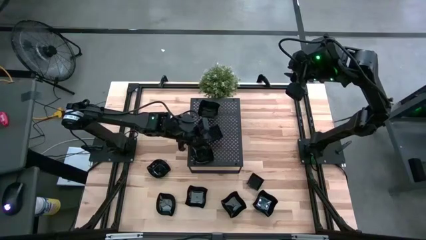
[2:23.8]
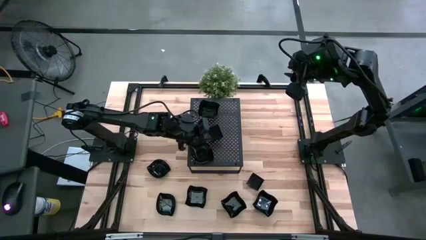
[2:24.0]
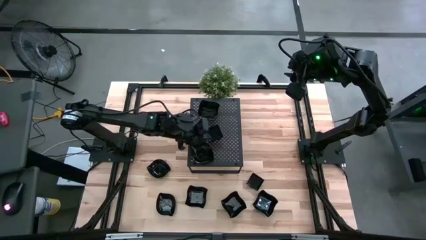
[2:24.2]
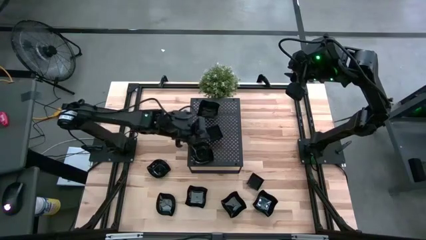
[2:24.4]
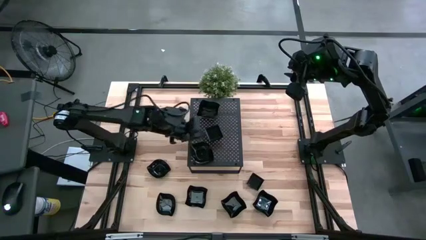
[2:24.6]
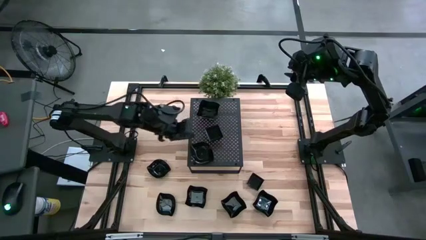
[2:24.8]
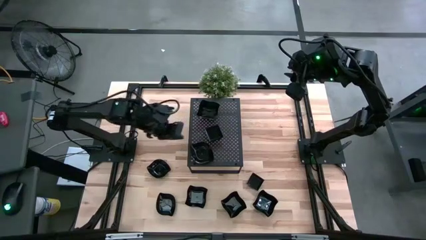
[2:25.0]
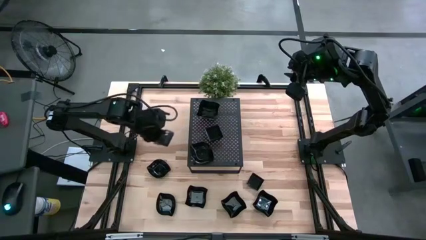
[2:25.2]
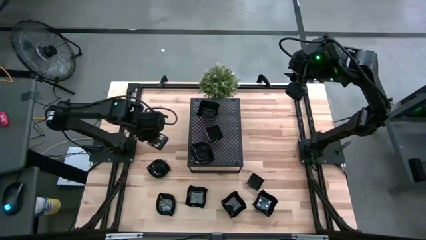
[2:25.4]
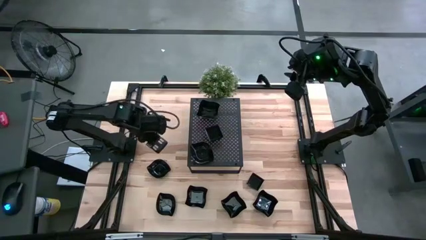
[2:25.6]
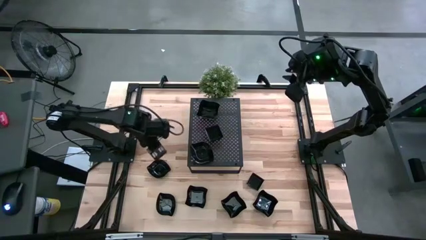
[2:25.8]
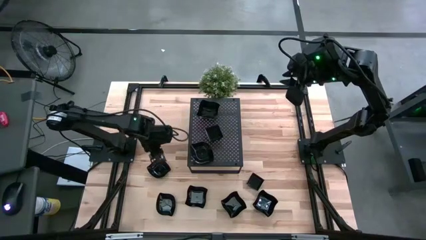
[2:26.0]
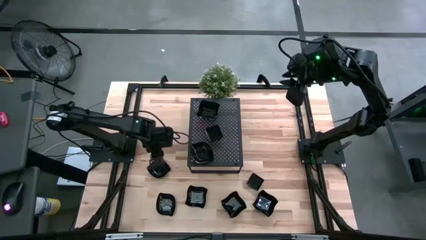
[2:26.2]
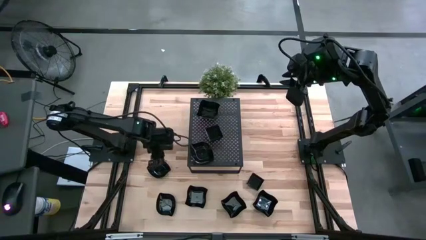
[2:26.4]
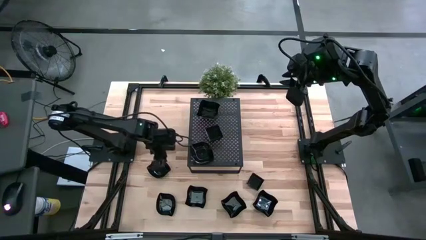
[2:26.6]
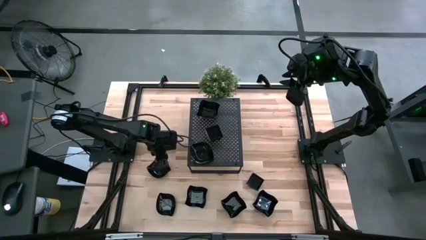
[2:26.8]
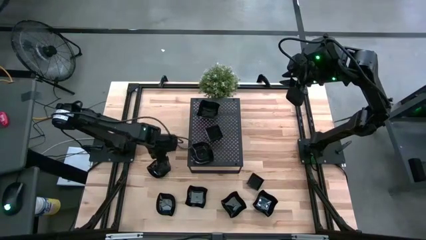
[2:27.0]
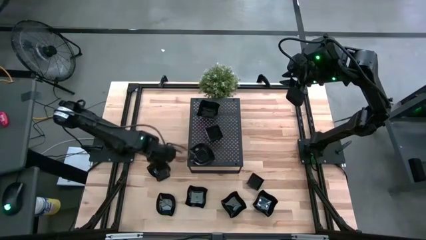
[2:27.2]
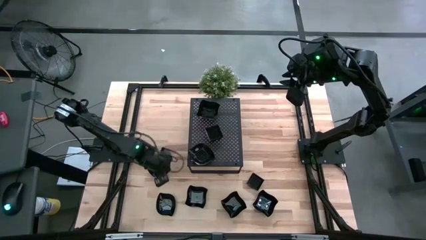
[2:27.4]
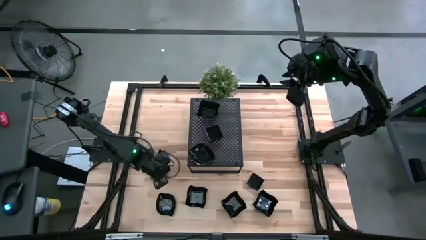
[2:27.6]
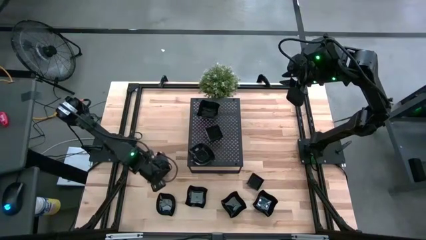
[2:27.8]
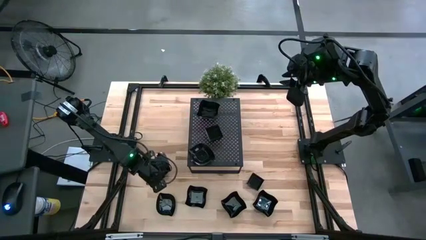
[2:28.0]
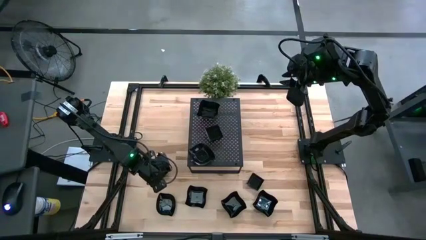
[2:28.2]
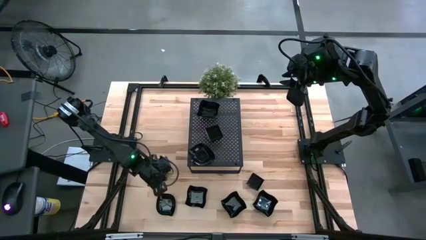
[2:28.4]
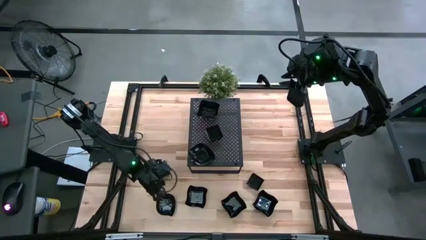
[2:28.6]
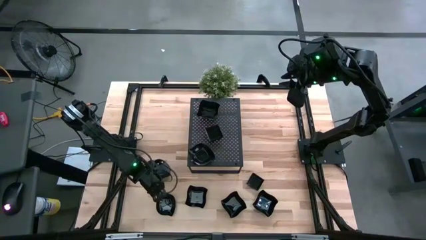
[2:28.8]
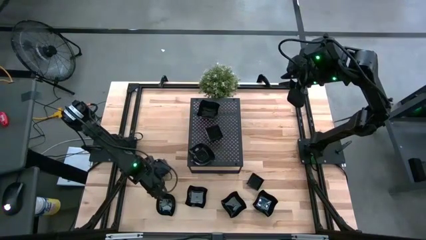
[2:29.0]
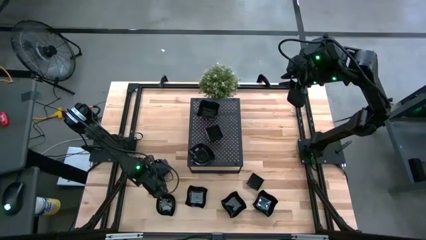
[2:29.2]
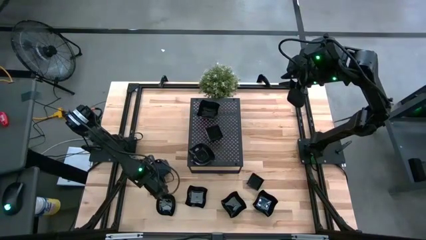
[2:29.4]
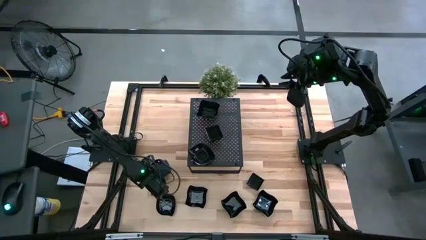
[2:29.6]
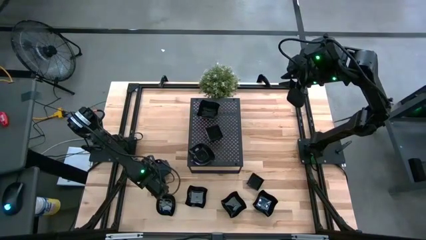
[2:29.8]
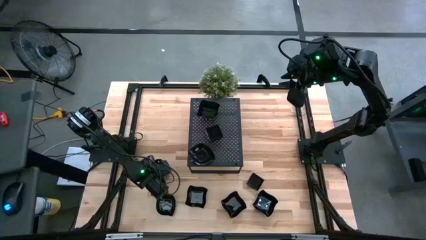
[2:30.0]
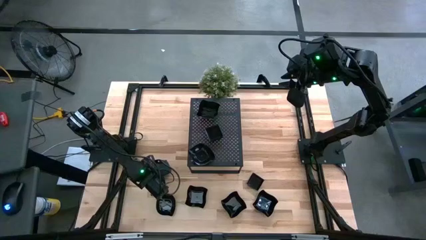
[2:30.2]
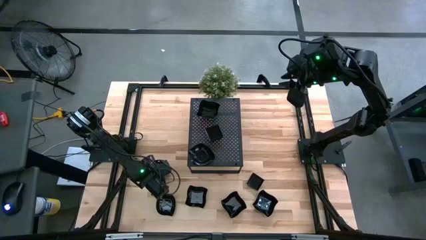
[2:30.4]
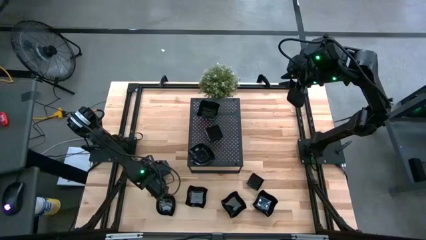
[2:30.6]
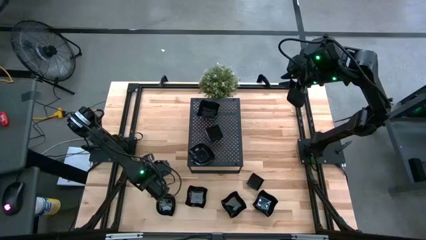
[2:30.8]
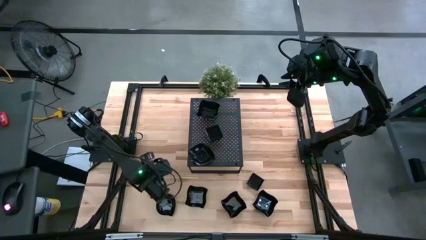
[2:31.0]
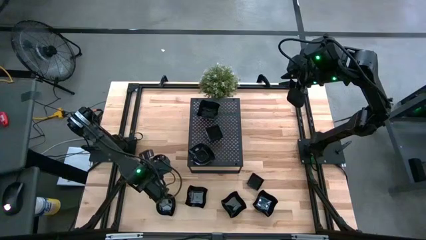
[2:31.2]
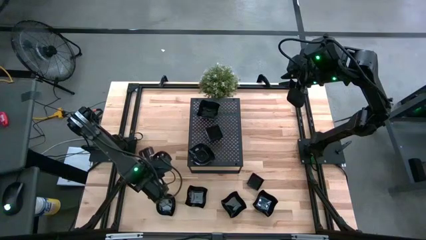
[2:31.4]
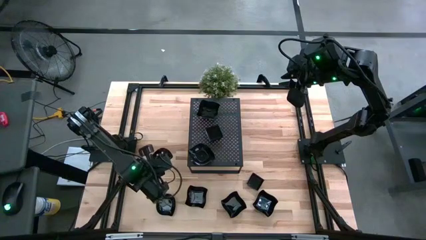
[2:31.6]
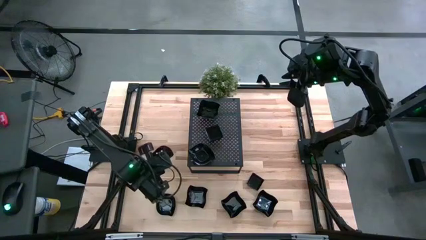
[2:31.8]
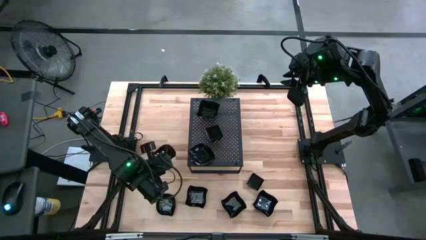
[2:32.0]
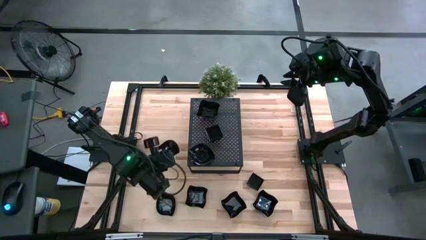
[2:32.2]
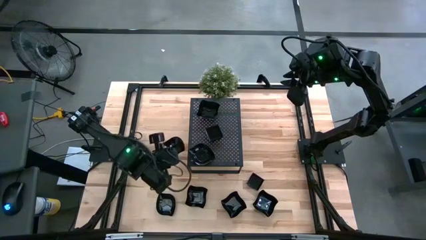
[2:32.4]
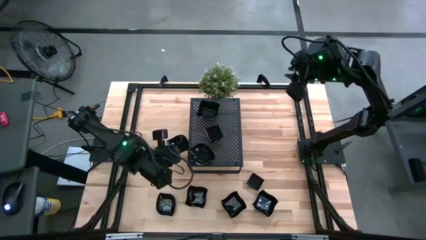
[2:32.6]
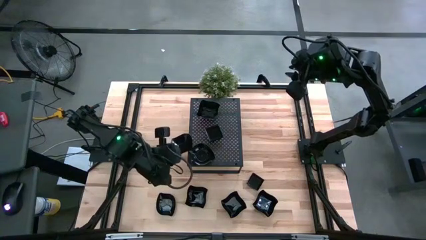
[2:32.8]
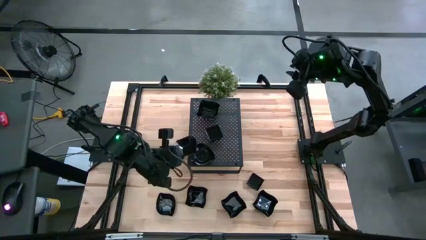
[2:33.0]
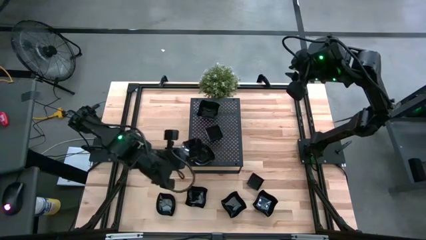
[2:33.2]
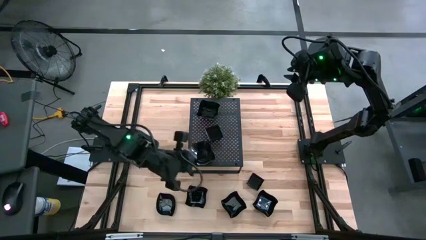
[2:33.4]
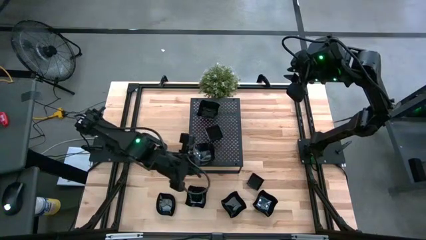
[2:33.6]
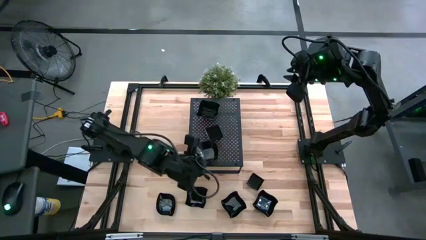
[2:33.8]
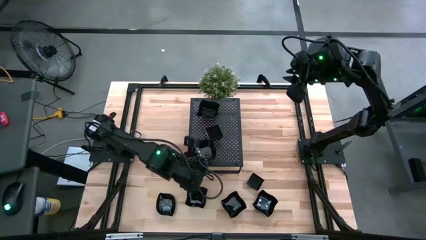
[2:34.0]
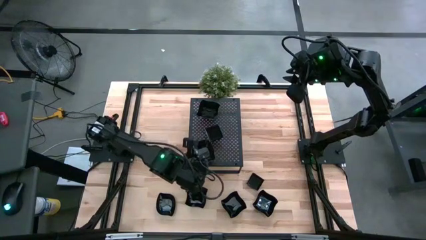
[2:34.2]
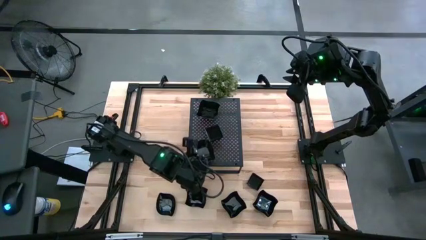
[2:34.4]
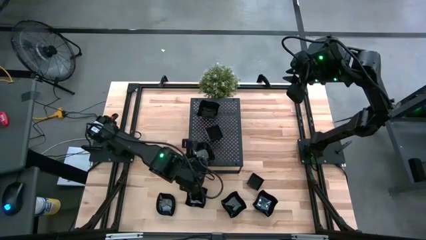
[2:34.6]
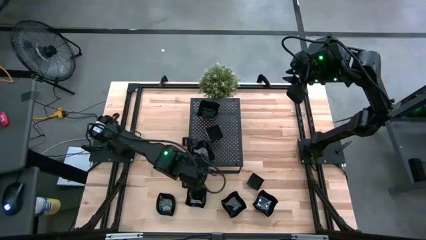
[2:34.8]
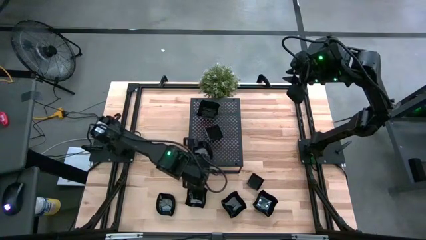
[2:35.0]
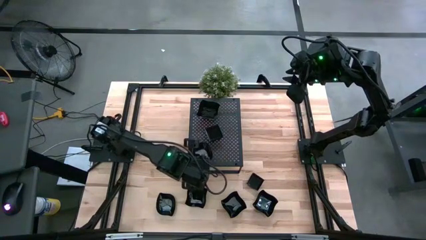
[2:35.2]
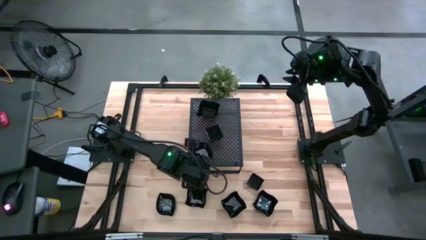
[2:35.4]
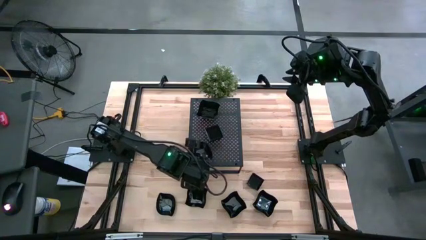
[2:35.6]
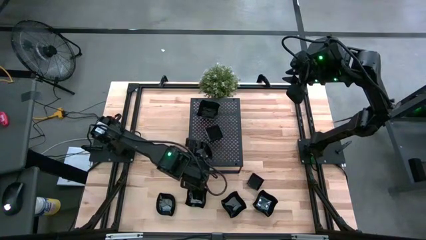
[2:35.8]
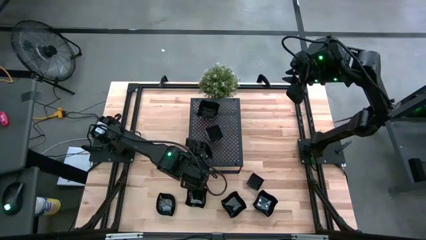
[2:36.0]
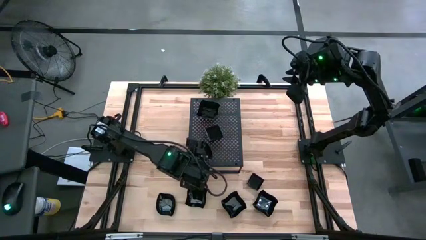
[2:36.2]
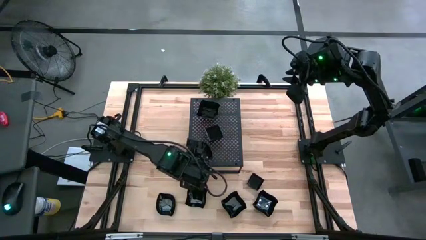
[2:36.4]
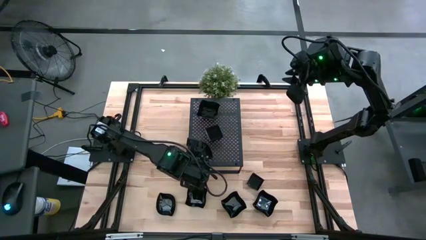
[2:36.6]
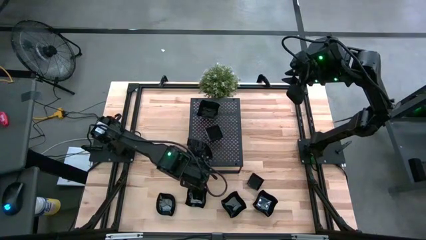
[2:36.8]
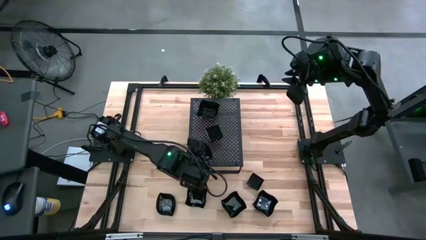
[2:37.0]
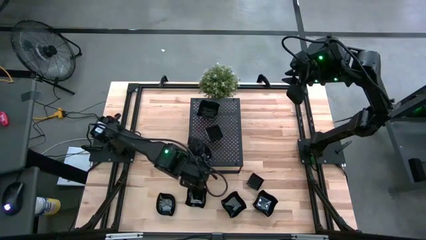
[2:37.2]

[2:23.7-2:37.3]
Task: Pick & Place Mini shaped plates
Stack the leaf-shaped plate on top of the leaf-shaped plates on the shelf
